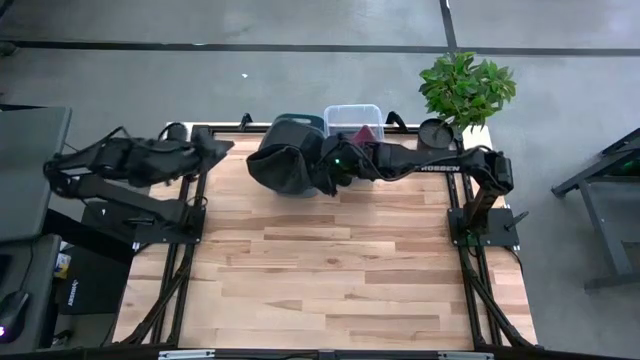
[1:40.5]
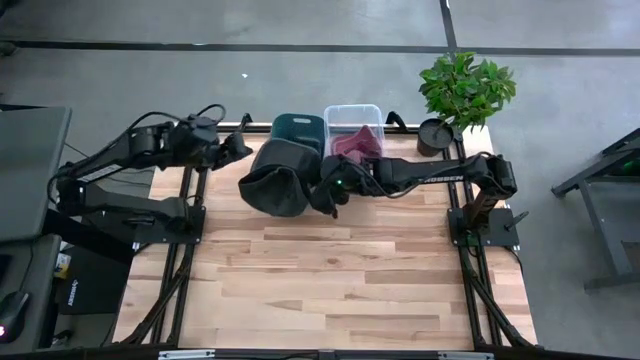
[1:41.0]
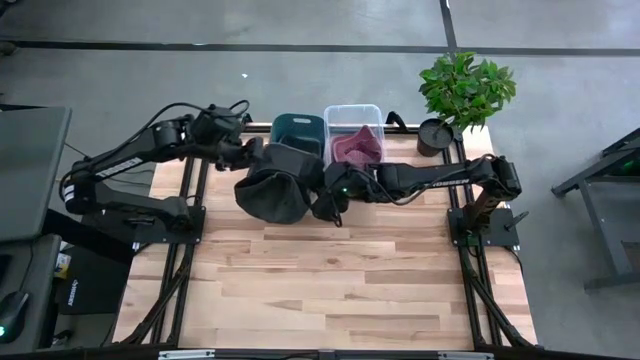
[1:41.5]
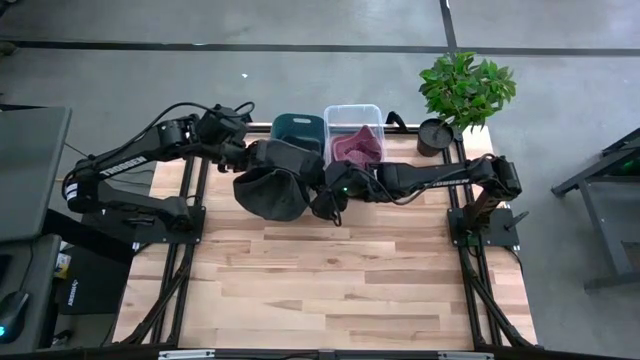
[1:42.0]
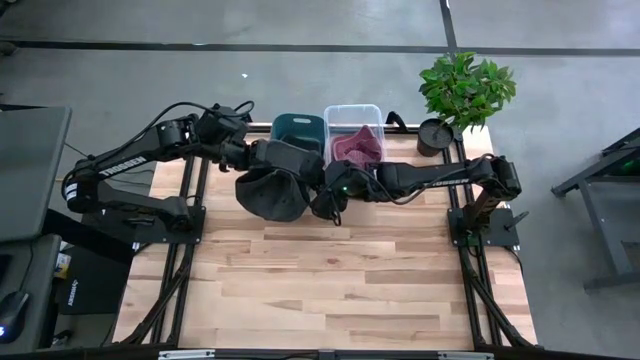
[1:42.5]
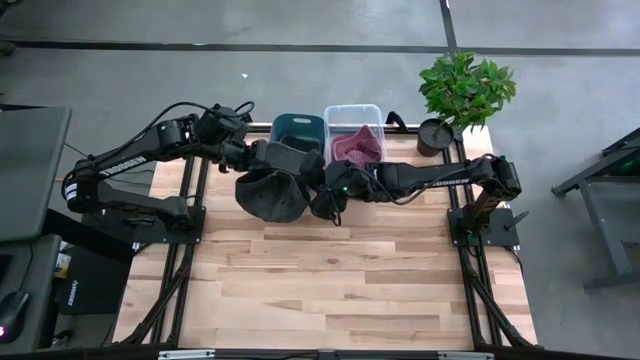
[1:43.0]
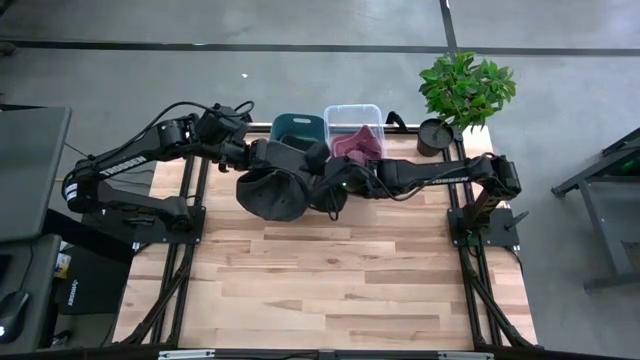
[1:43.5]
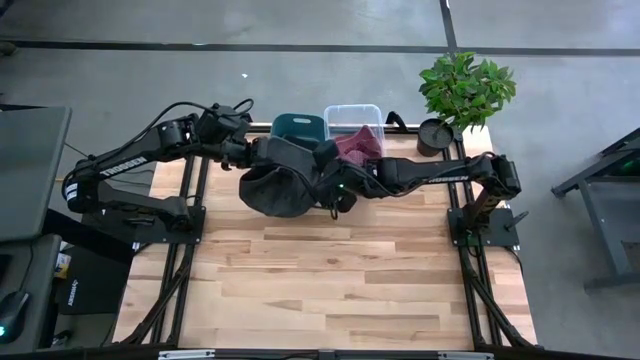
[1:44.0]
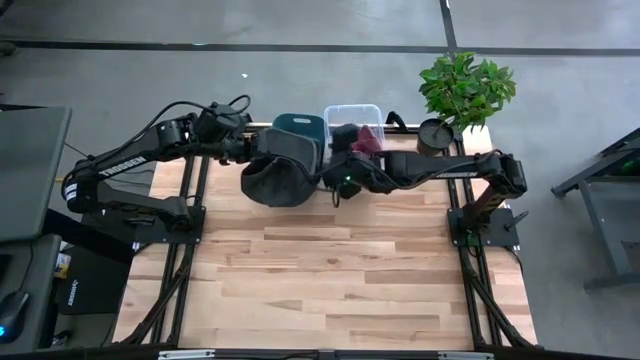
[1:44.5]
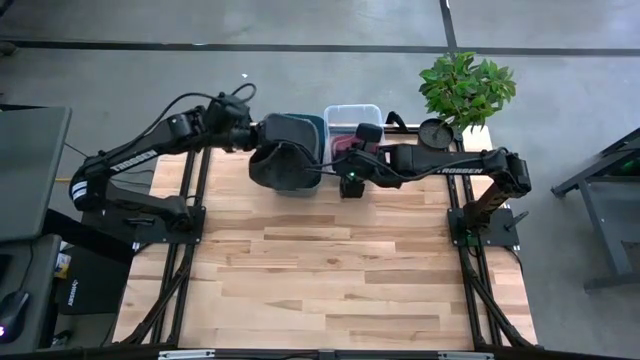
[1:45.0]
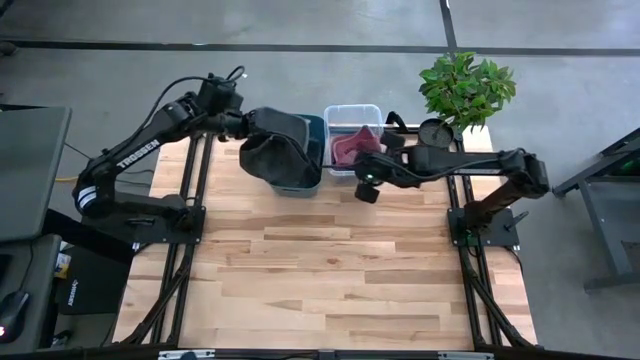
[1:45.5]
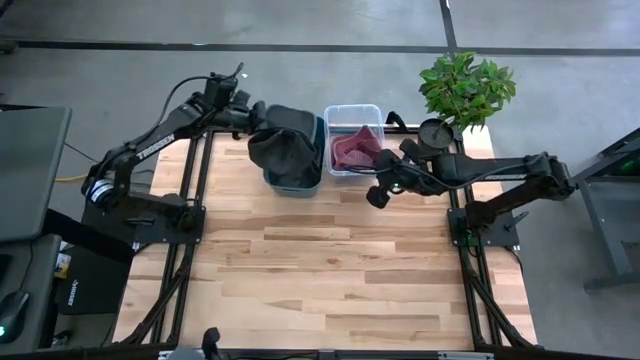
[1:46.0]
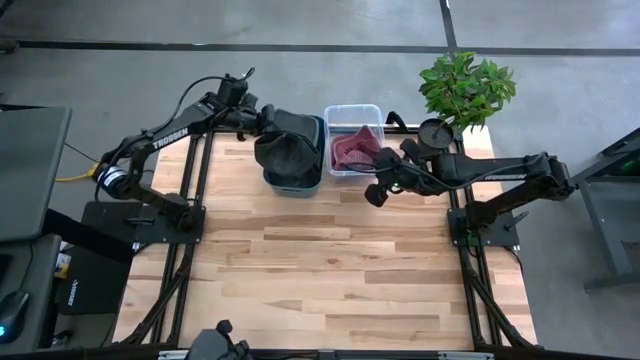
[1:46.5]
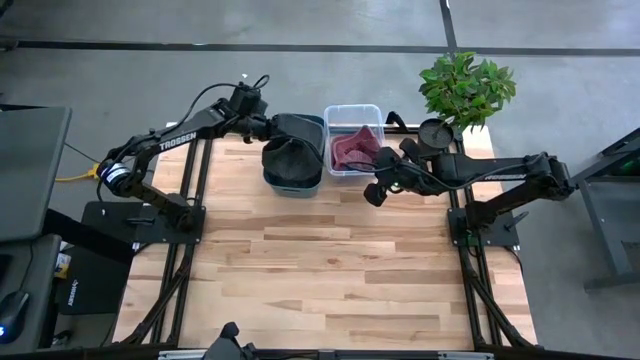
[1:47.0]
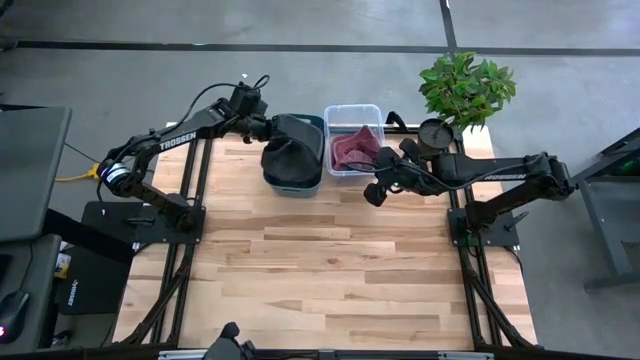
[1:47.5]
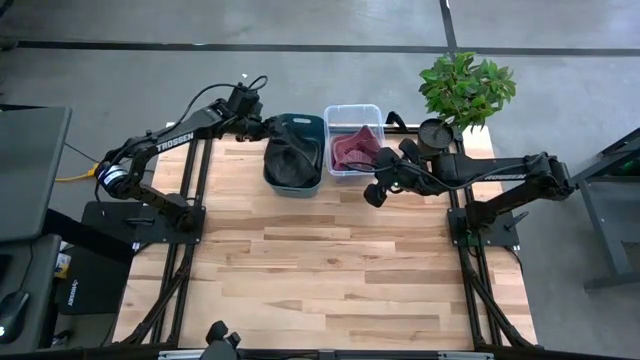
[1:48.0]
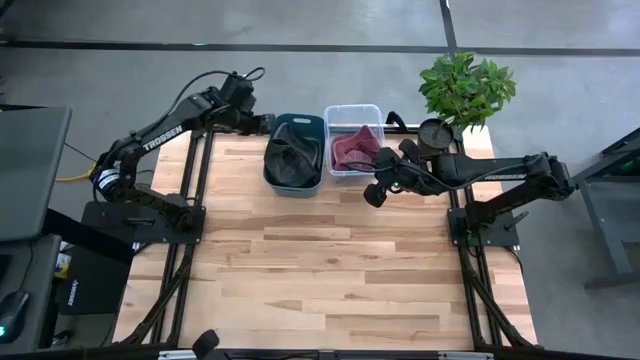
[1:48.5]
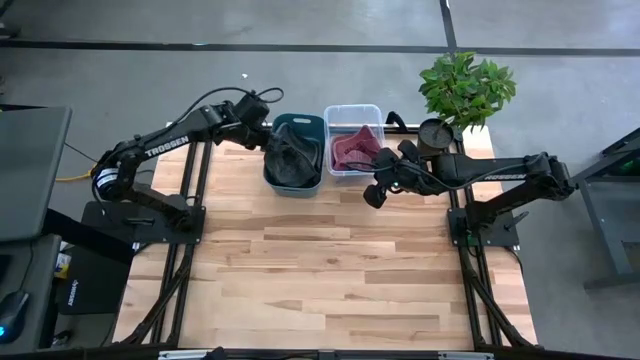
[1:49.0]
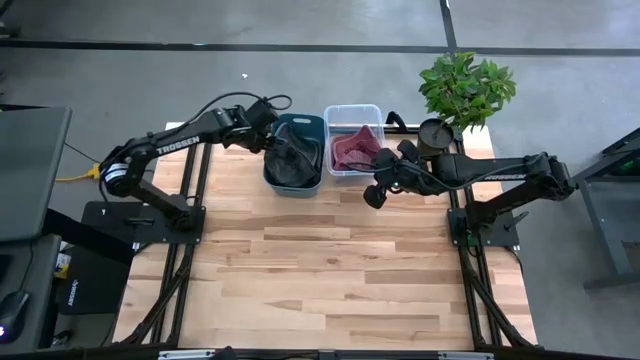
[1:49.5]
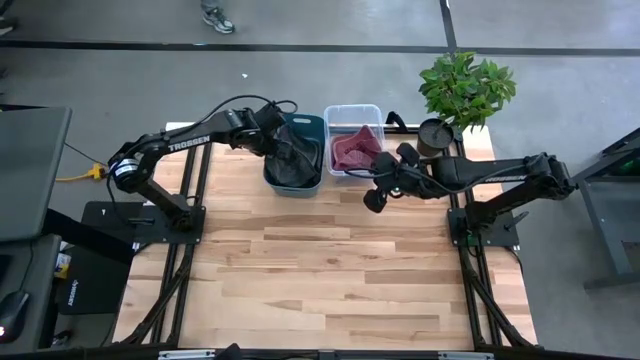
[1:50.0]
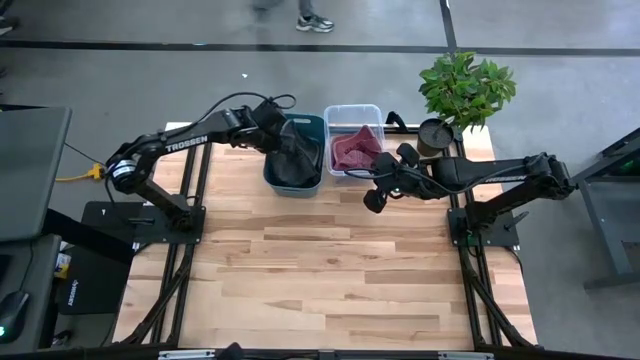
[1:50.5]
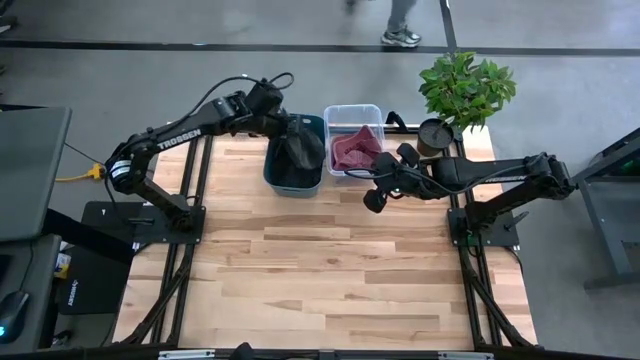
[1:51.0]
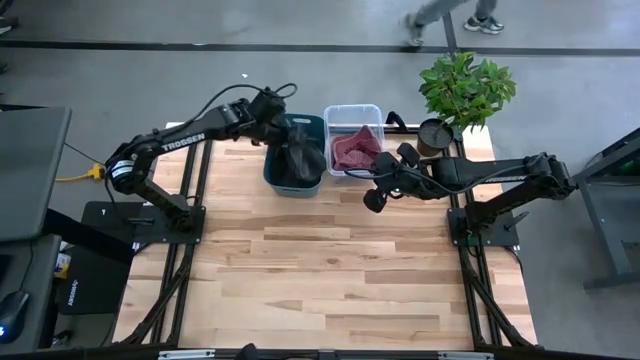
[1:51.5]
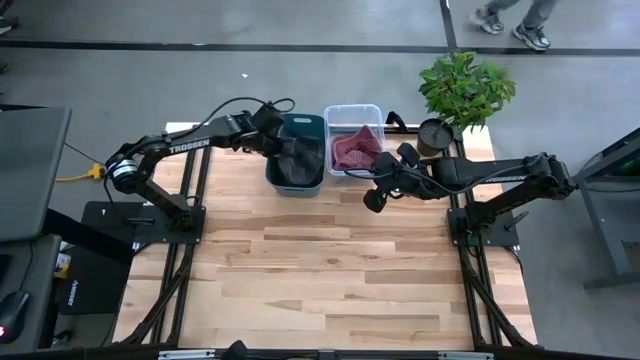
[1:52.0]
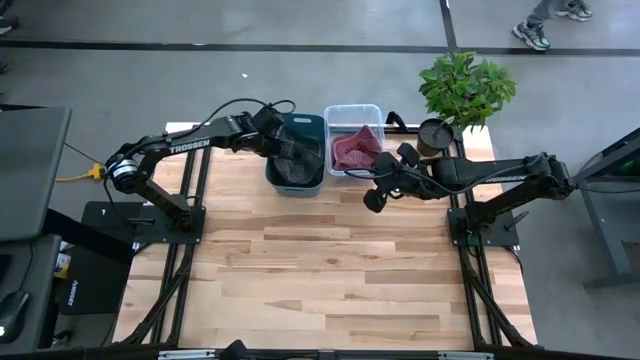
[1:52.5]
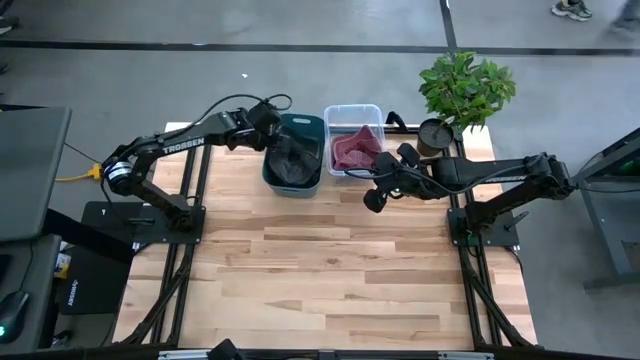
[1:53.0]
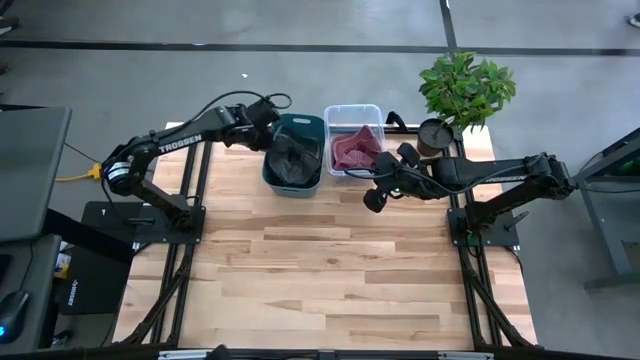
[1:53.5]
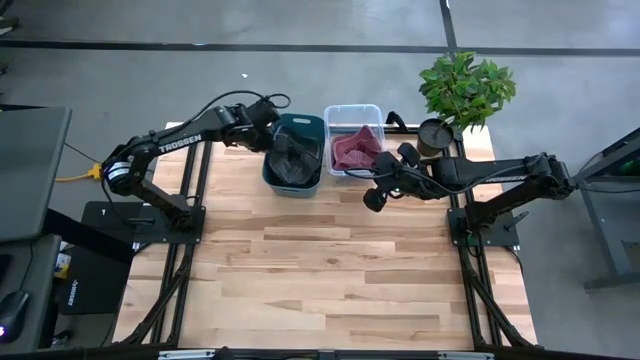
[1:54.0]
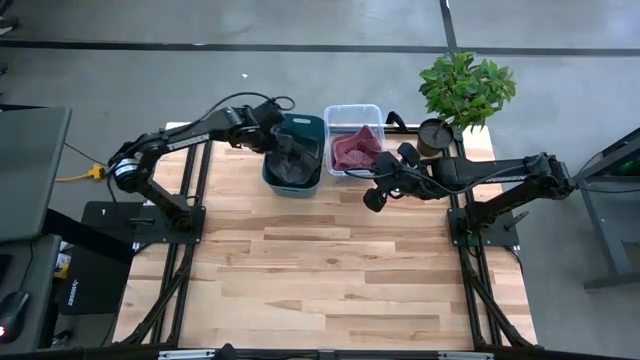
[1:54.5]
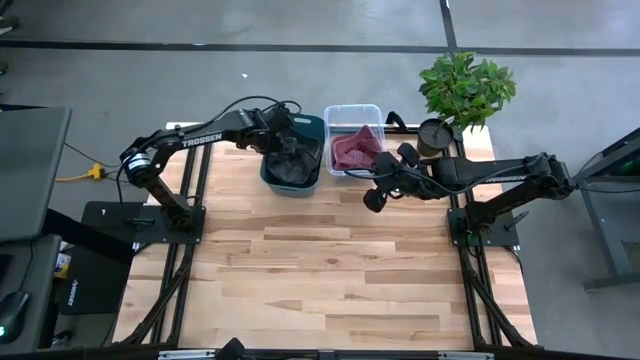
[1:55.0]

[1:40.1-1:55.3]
Task: Pick & Place hat
Put the black cap into the blue bin

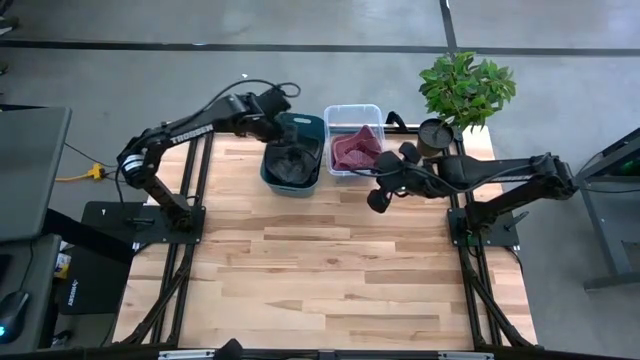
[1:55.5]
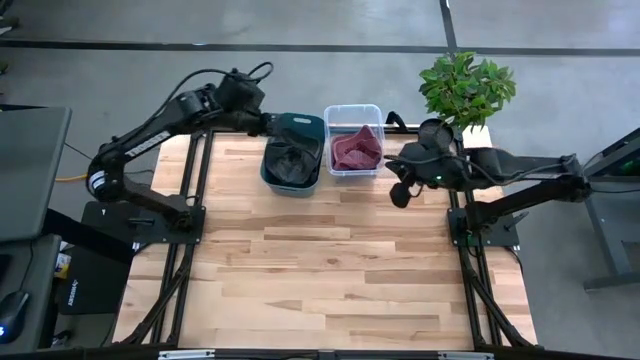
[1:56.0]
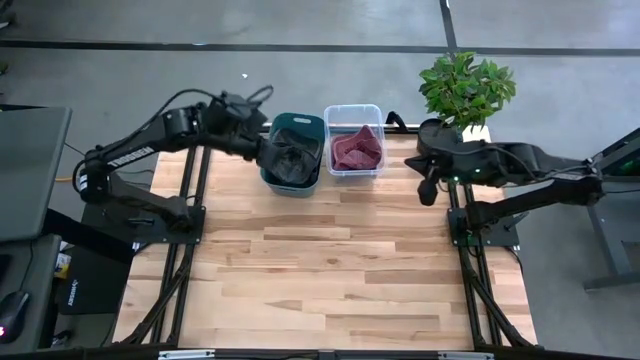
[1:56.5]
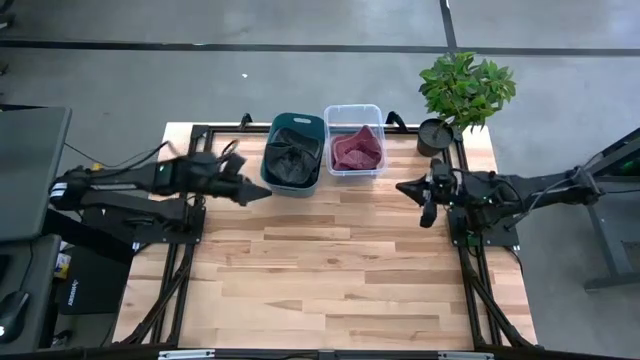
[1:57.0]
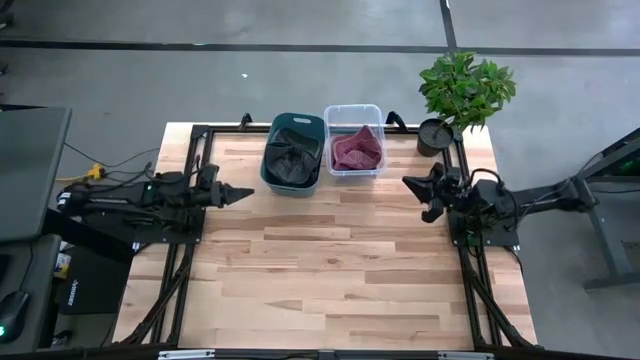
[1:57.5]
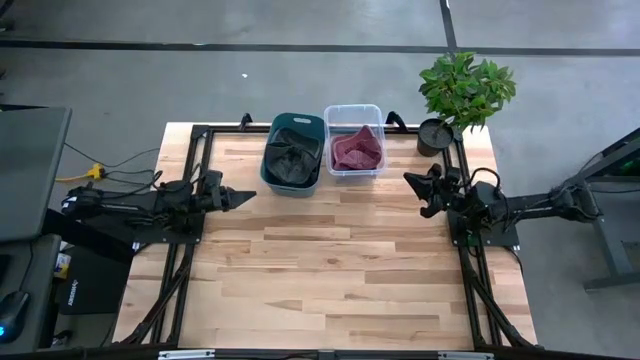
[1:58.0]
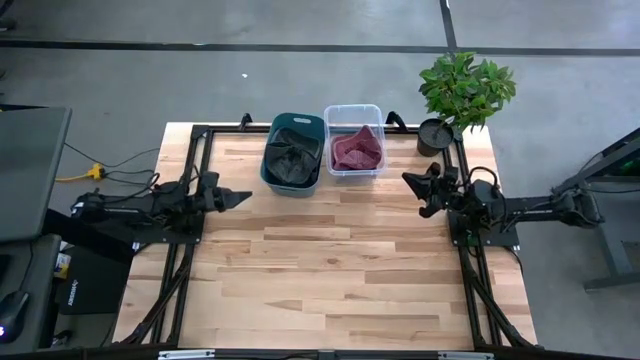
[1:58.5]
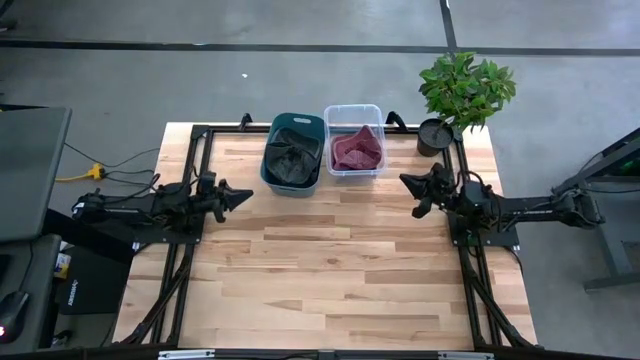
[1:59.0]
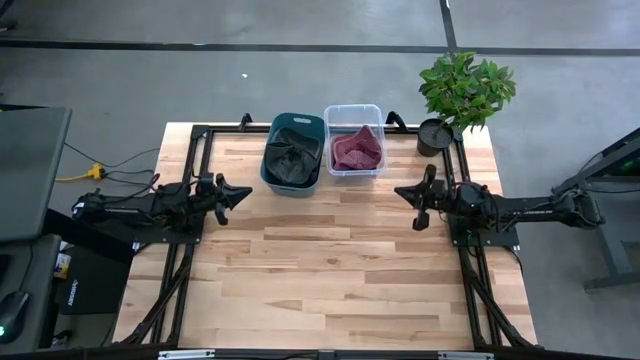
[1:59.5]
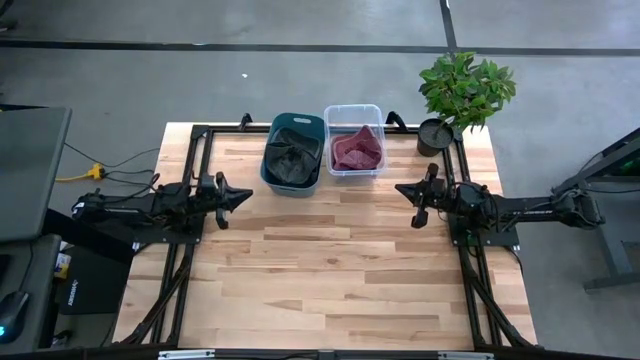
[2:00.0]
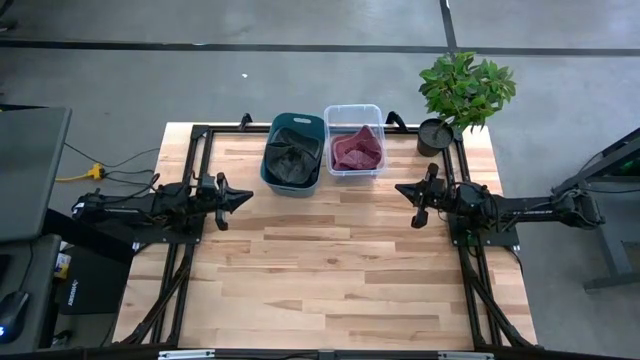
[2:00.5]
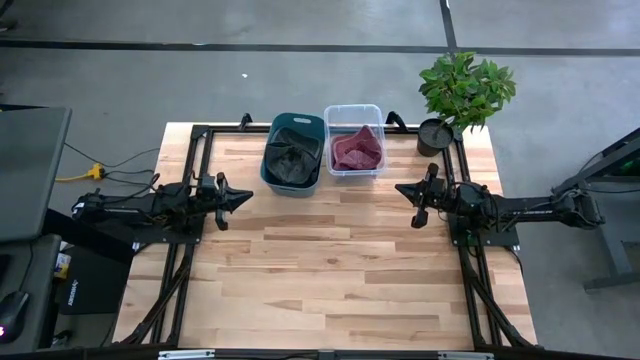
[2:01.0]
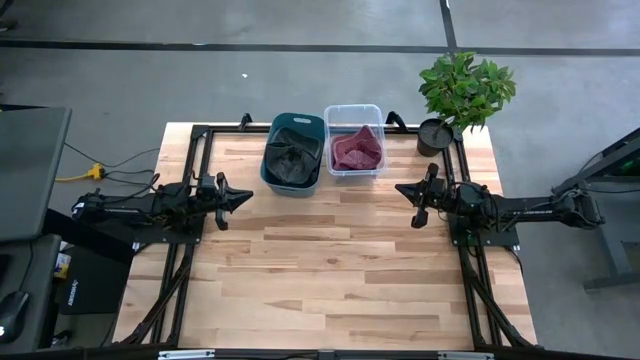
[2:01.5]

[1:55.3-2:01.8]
Return to Home Position
